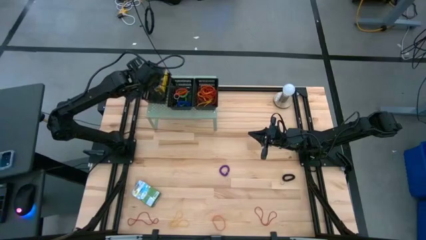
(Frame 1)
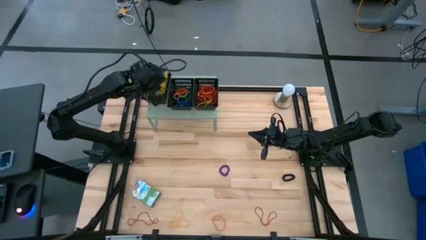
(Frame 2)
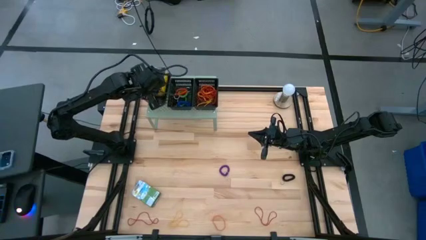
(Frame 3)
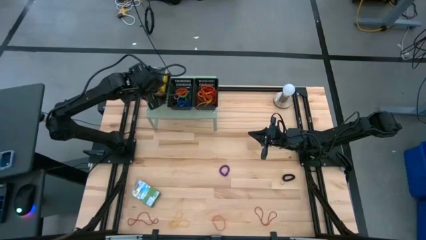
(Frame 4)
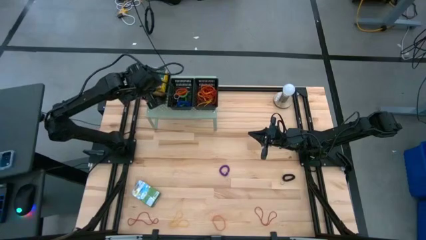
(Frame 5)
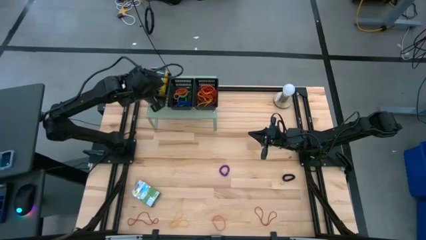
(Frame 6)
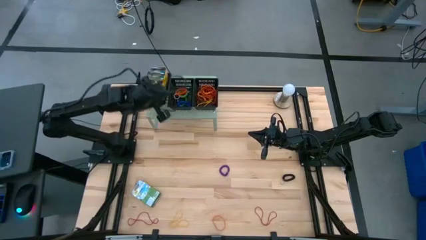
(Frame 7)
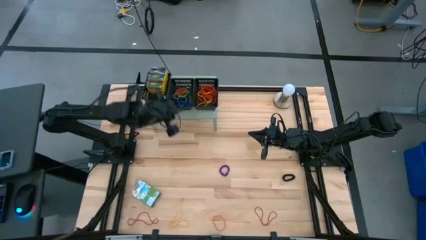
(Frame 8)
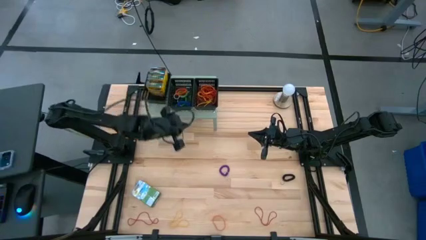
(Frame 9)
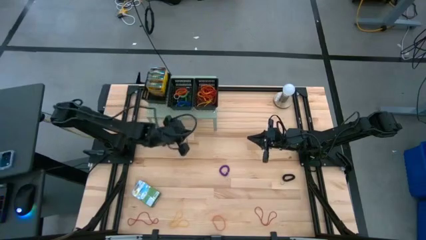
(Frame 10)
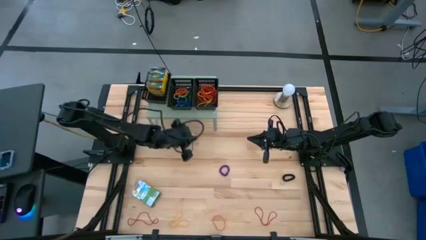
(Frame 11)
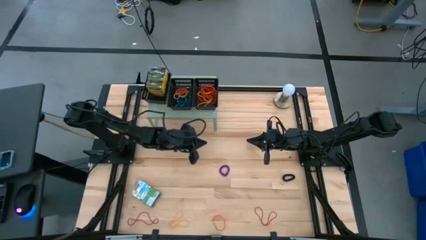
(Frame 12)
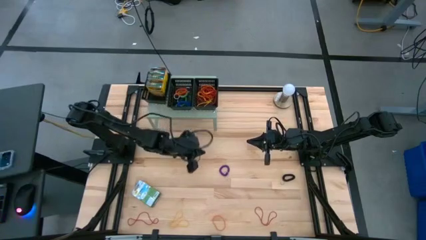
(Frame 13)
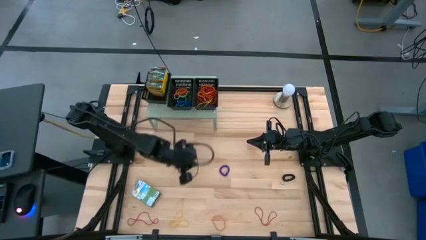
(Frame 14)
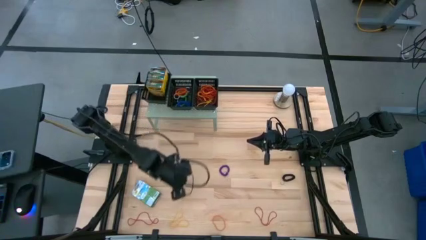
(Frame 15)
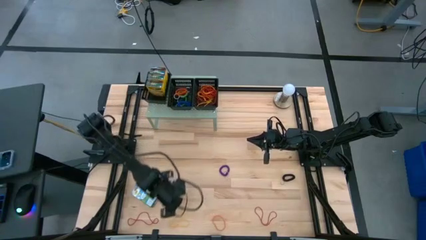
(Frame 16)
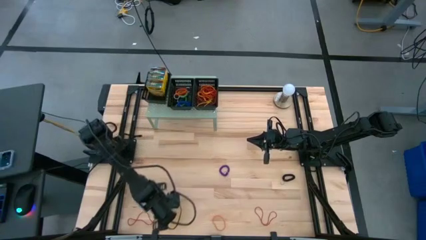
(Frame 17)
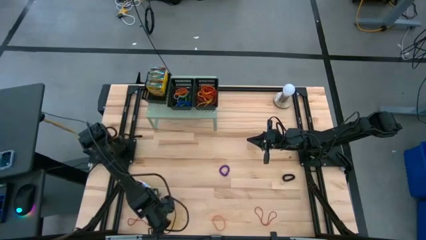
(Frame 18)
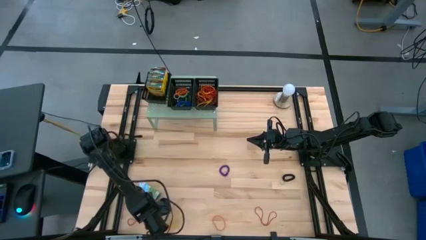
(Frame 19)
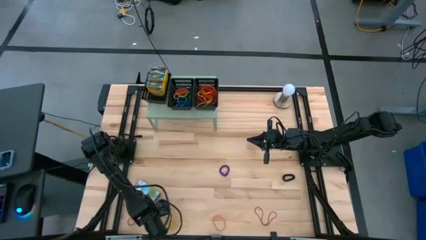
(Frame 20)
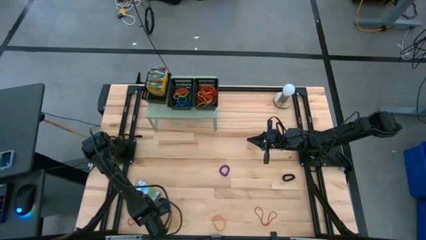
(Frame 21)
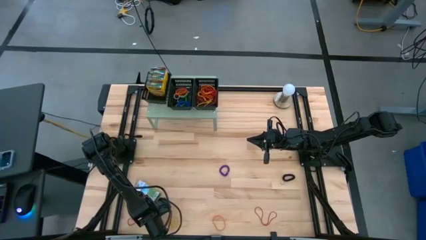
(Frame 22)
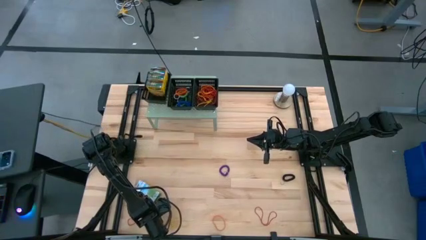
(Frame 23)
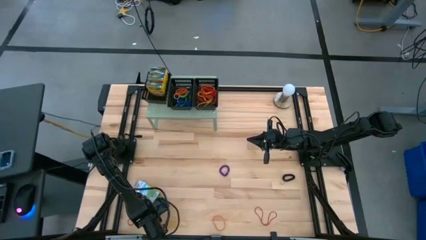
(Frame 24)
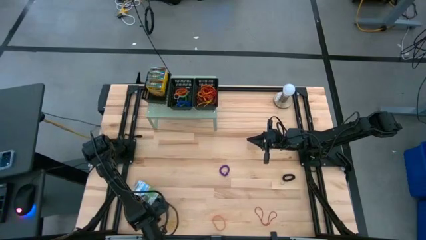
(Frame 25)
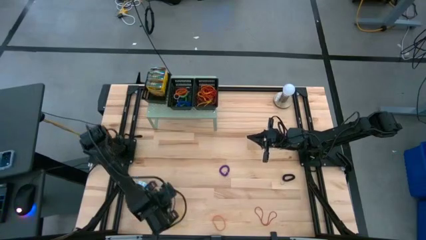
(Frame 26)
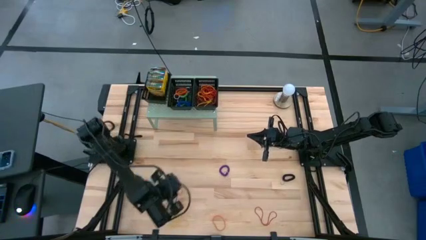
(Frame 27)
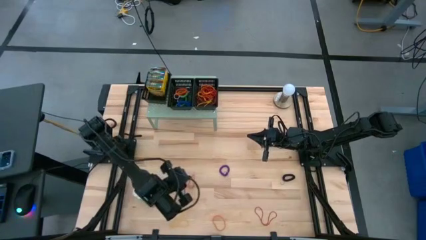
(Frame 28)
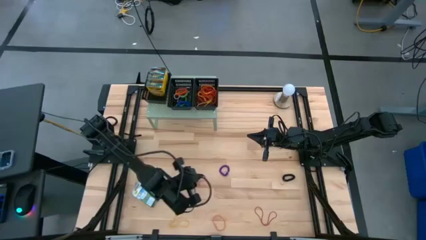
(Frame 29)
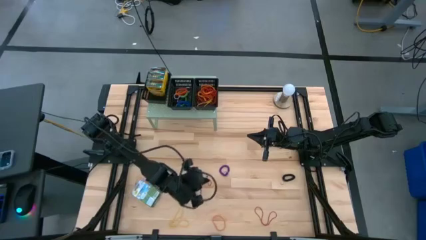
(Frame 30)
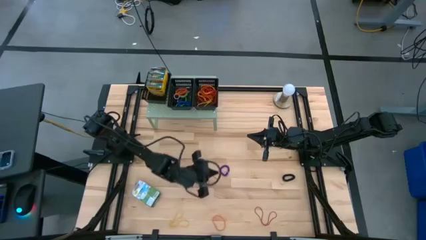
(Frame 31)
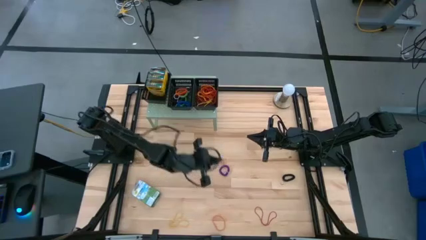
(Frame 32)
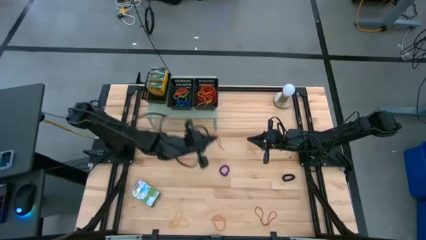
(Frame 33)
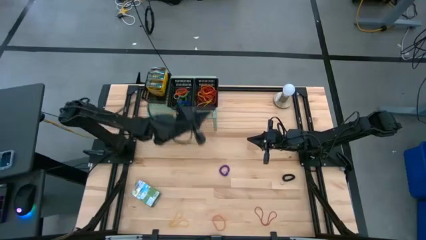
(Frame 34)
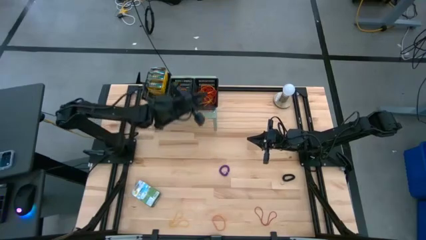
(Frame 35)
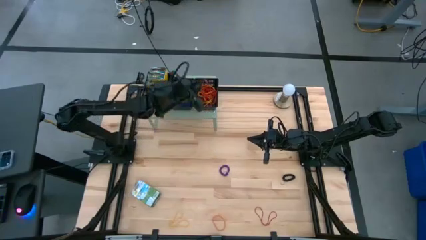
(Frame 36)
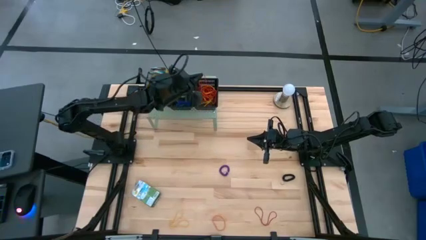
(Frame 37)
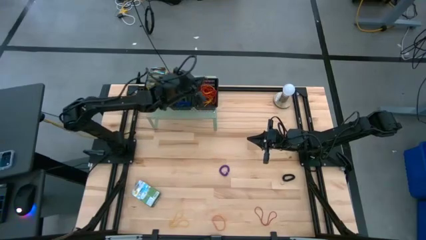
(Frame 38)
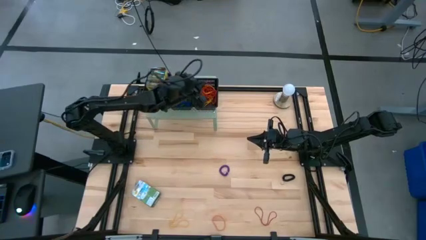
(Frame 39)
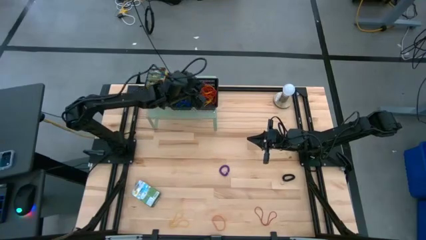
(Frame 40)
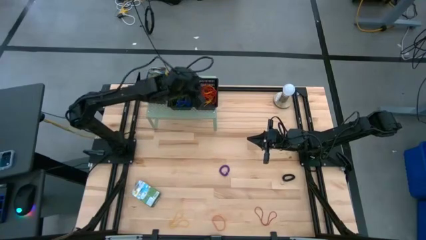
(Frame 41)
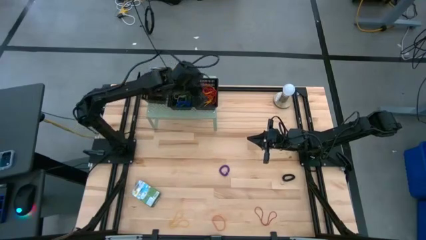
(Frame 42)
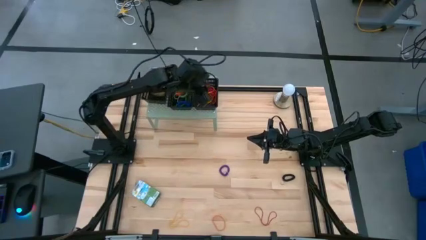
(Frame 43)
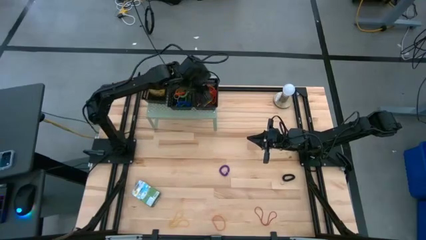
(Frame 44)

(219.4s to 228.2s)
Task: Pick & Place Office Desk Supplies
Put the red rubber band into the right black bin on the shelf

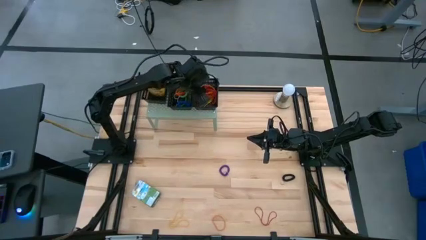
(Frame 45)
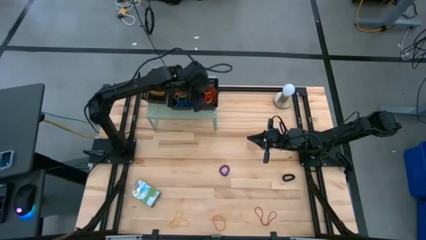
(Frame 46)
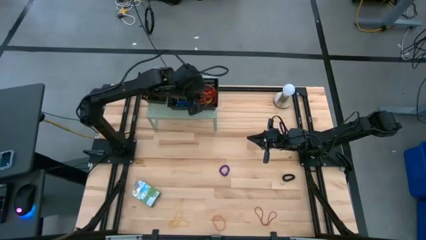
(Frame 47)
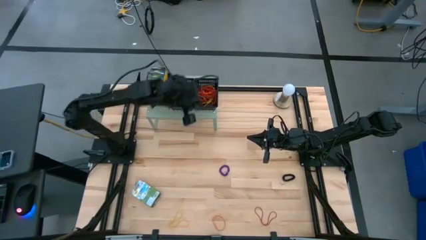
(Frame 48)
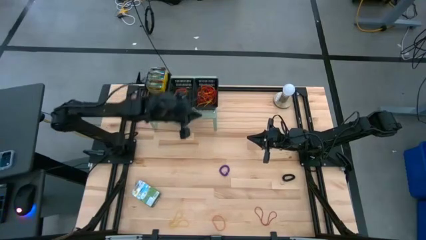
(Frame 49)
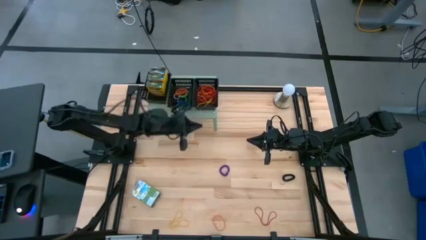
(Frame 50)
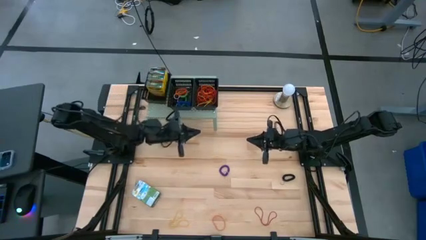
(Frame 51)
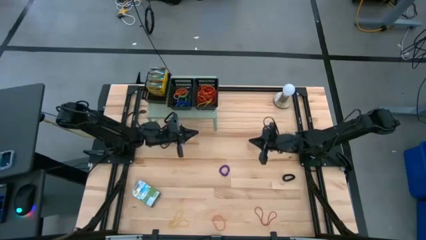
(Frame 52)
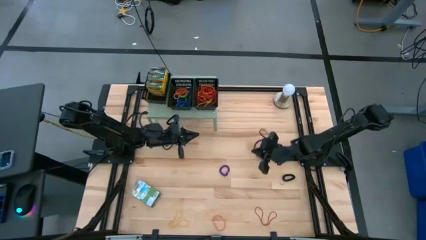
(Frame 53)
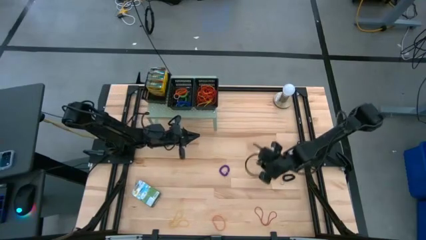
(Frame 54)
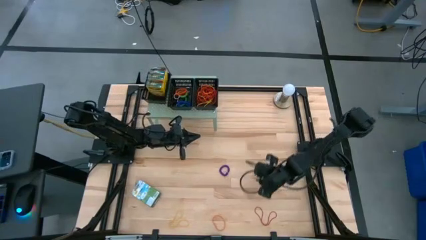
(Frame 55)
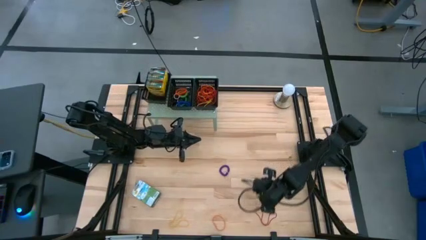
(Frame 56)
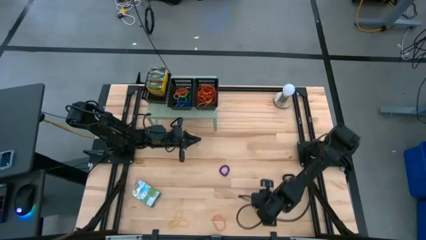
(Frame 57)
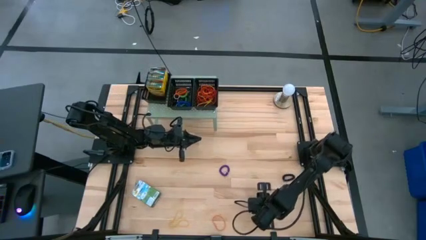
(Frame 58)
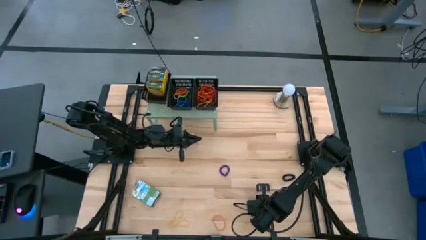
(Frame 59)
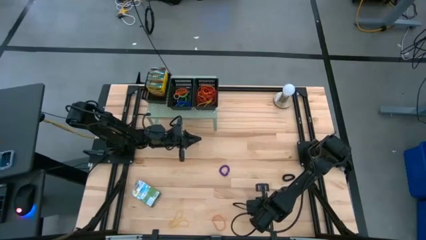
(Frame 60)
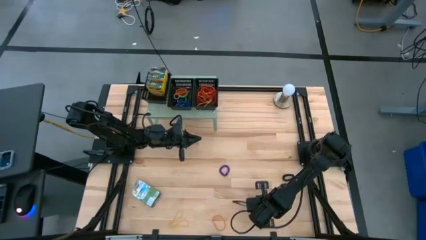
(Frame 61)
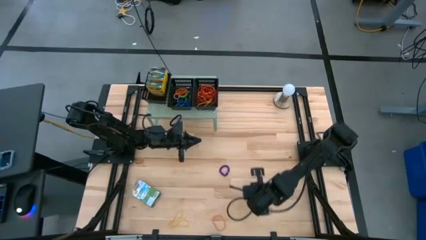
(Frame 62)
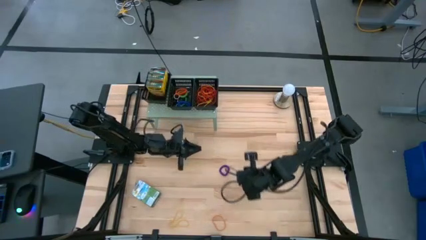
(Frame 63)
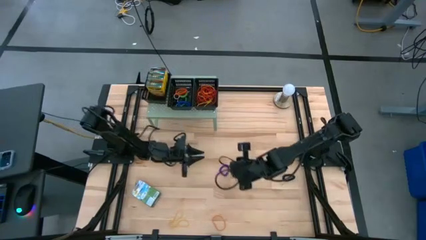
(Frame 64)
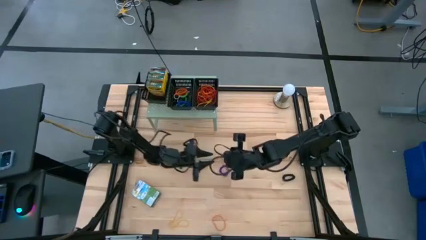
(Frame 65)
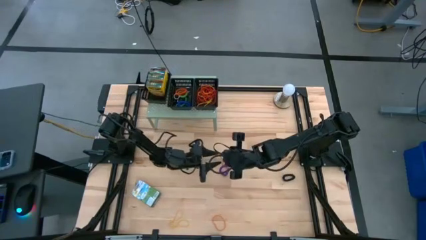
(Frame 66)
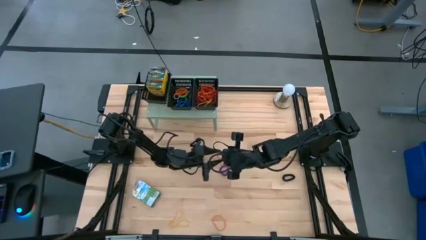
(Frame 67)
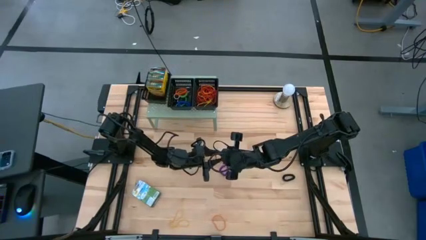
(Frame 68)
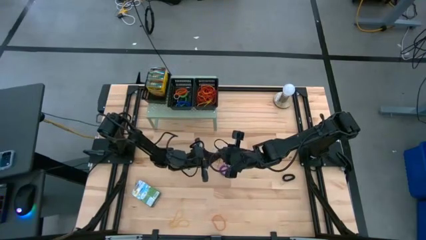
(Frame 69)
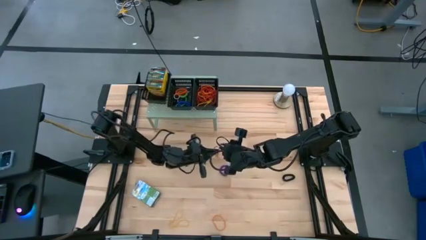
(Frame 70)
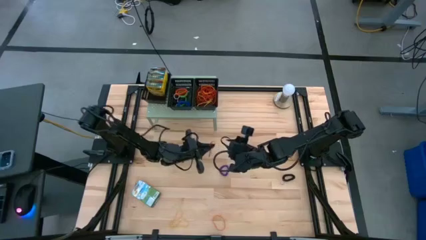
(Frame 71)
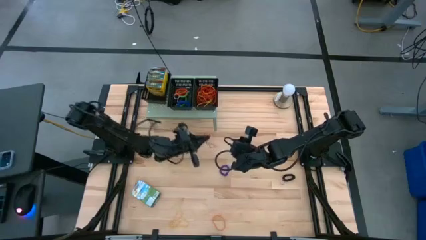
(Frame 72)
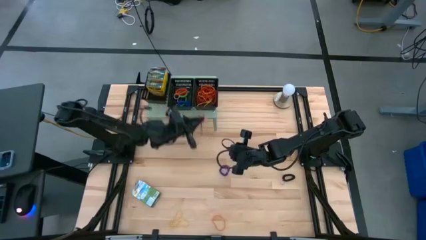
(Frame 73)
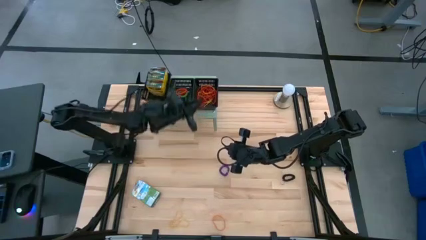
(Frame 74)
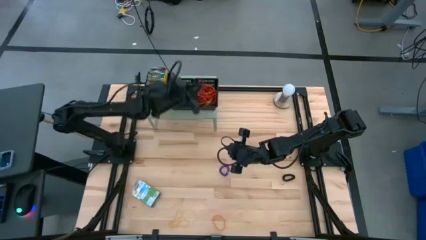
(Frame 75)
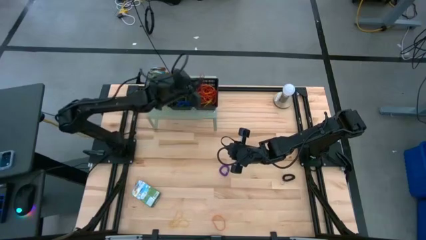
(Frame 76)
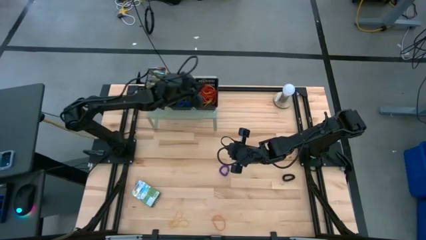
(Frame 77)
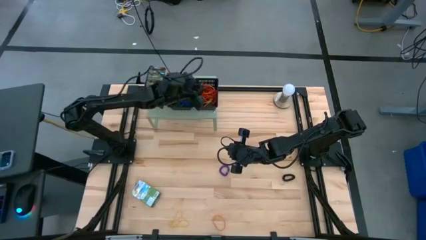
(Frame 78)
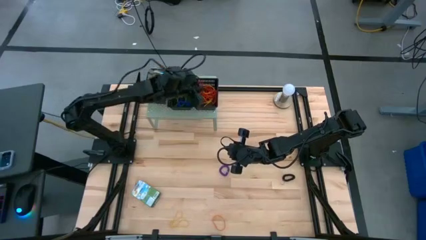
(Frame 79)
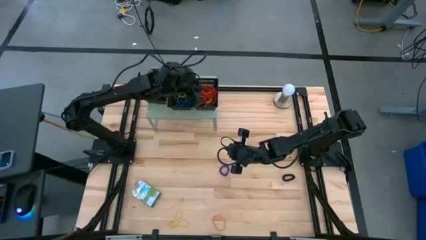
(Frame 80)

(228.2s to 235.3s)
Put the red rubber band into the right black bin on the shelf
